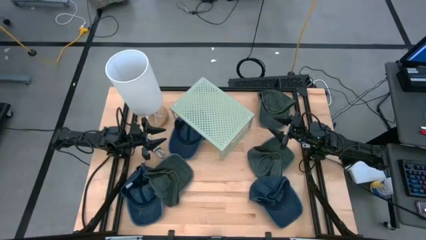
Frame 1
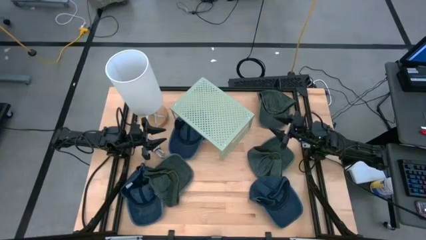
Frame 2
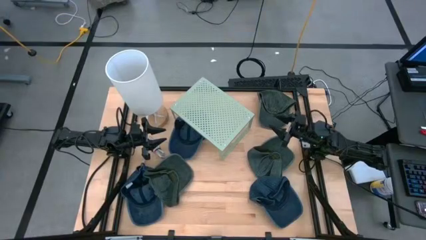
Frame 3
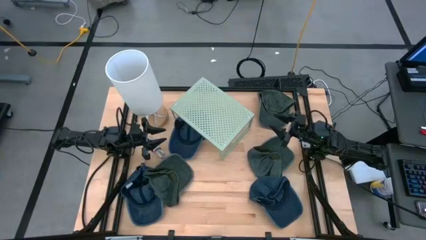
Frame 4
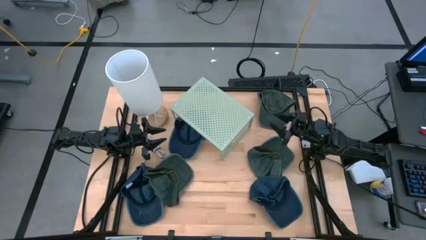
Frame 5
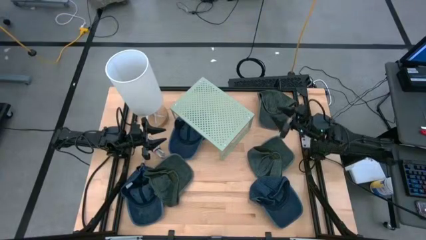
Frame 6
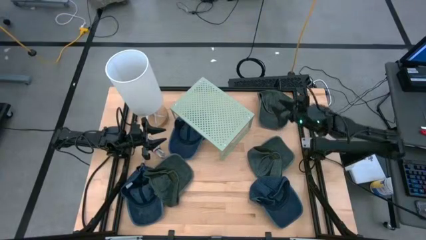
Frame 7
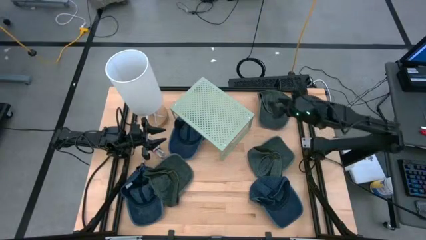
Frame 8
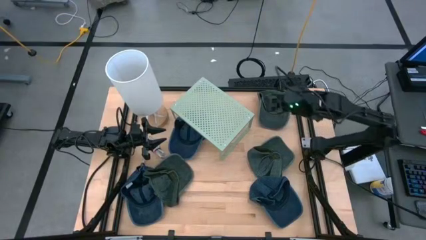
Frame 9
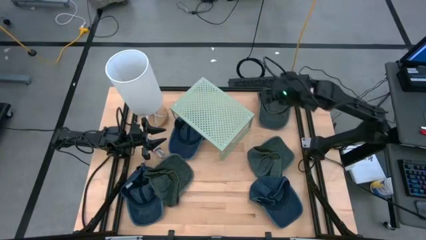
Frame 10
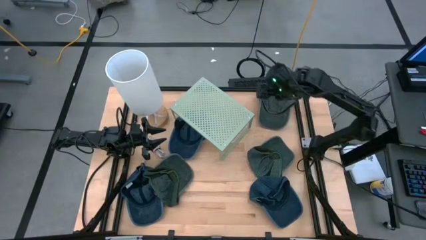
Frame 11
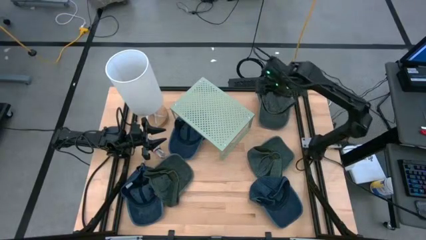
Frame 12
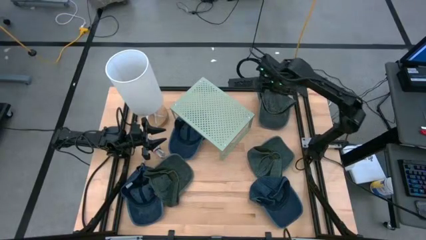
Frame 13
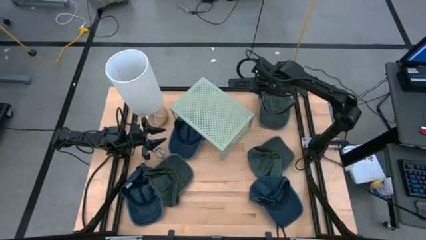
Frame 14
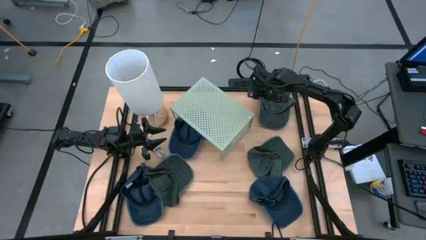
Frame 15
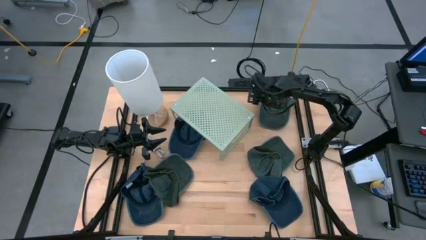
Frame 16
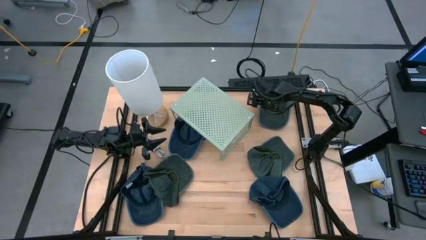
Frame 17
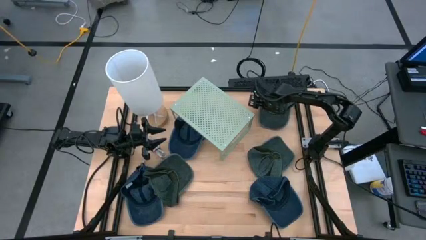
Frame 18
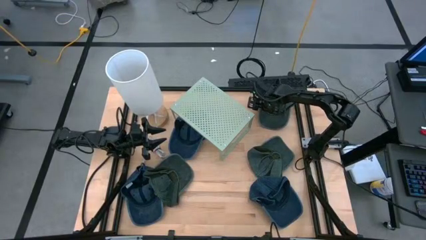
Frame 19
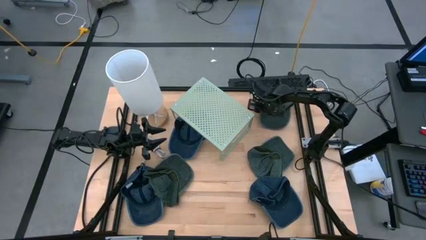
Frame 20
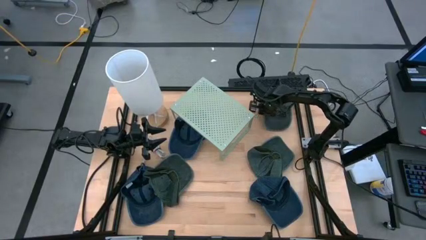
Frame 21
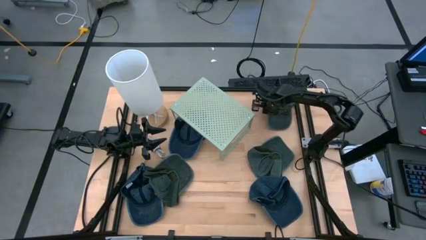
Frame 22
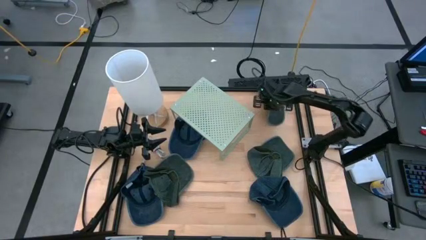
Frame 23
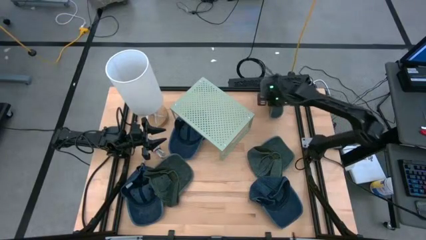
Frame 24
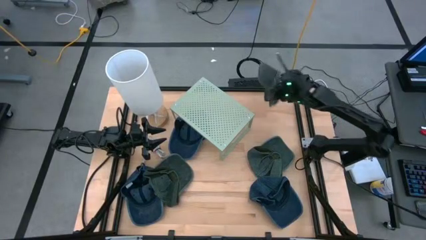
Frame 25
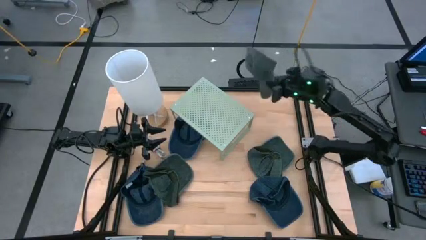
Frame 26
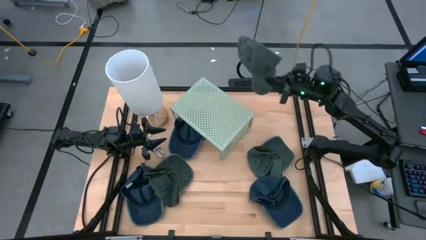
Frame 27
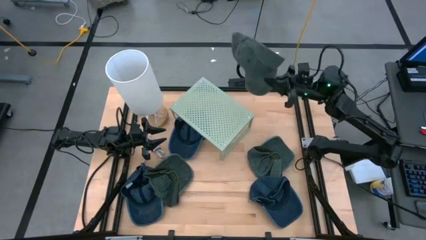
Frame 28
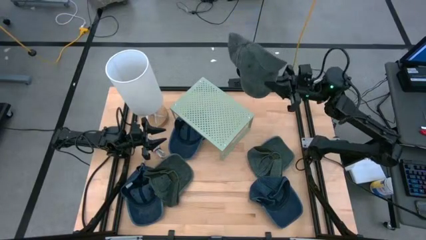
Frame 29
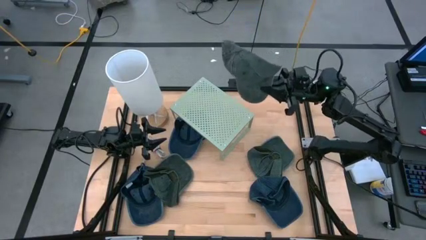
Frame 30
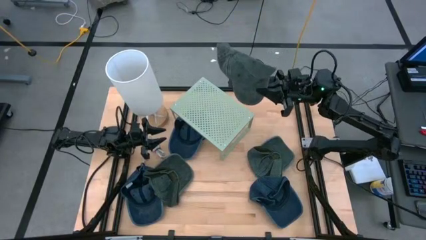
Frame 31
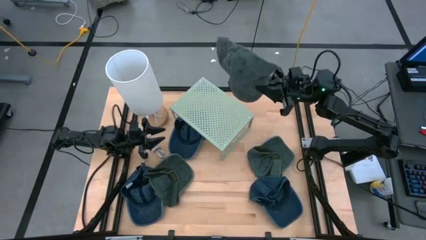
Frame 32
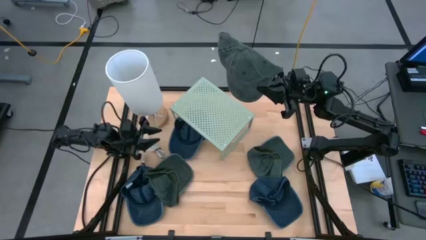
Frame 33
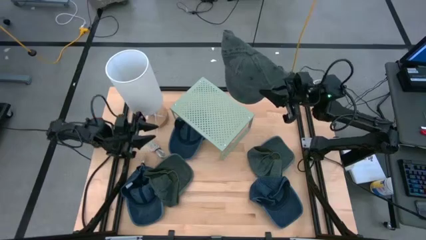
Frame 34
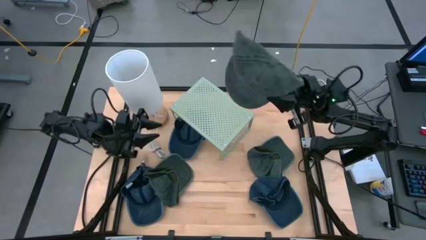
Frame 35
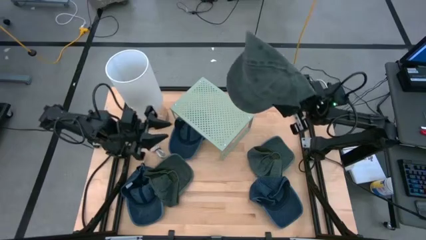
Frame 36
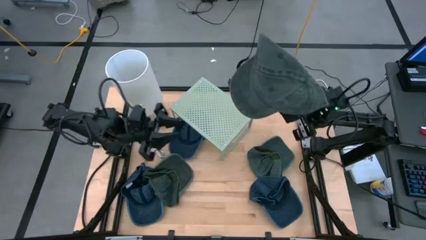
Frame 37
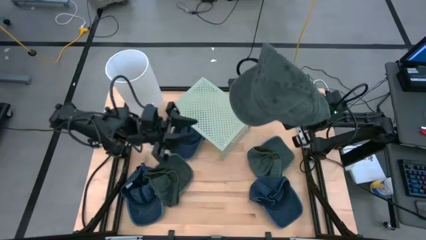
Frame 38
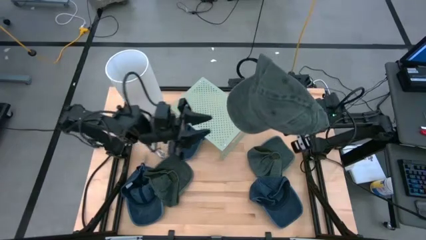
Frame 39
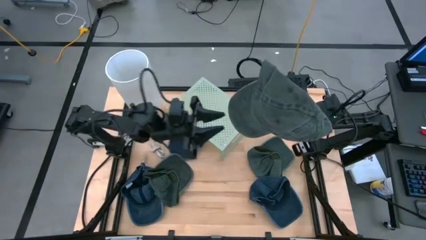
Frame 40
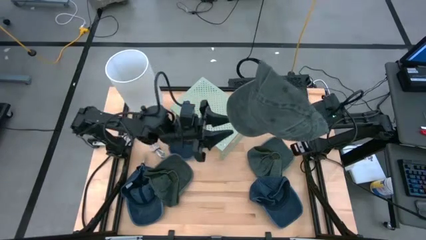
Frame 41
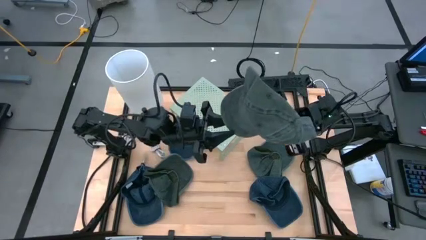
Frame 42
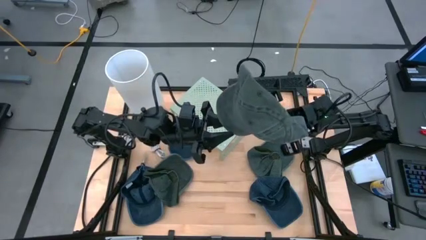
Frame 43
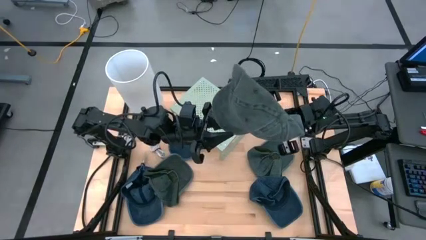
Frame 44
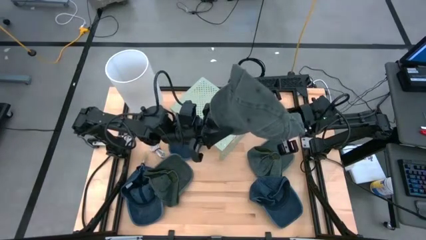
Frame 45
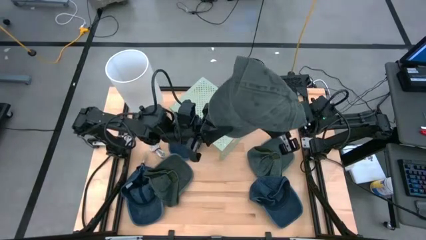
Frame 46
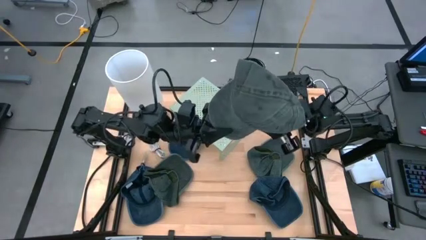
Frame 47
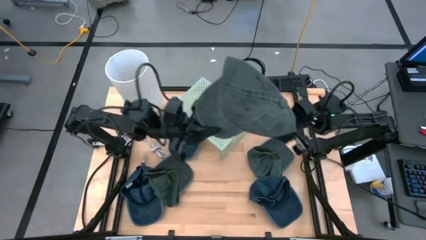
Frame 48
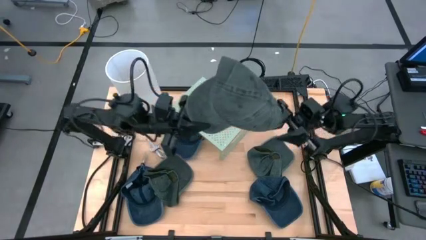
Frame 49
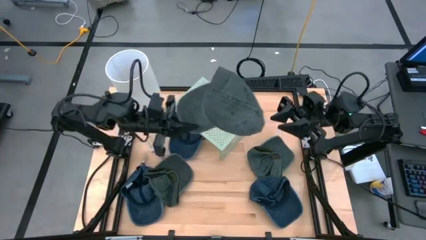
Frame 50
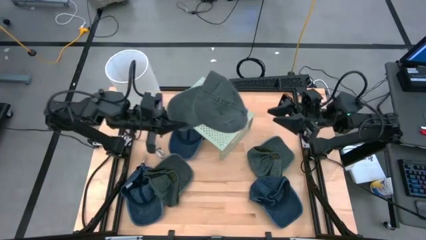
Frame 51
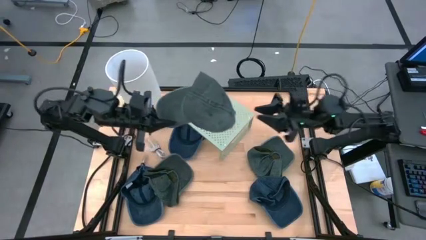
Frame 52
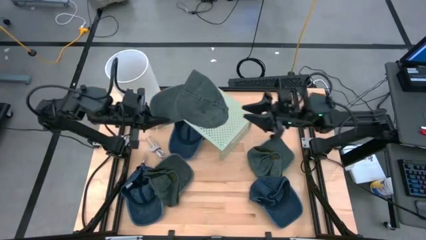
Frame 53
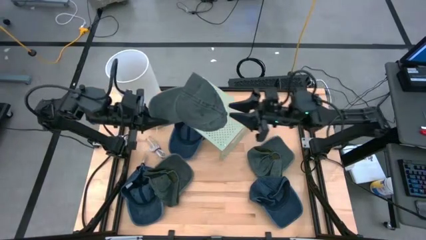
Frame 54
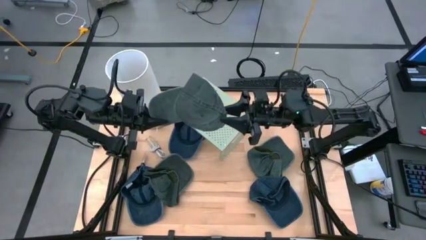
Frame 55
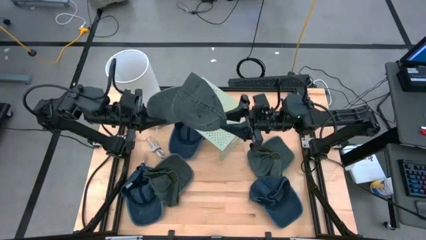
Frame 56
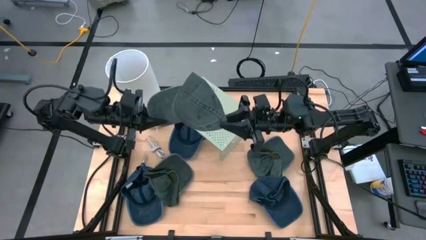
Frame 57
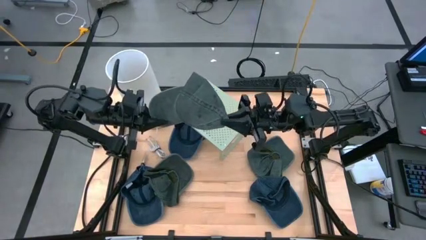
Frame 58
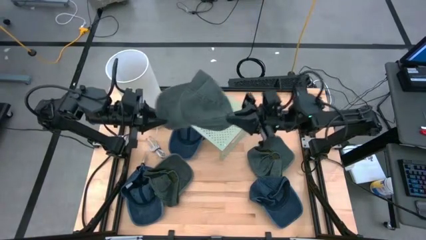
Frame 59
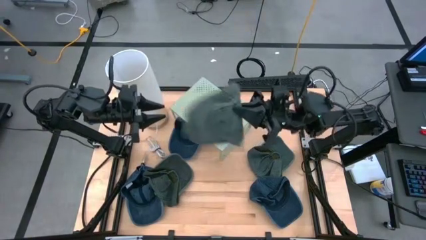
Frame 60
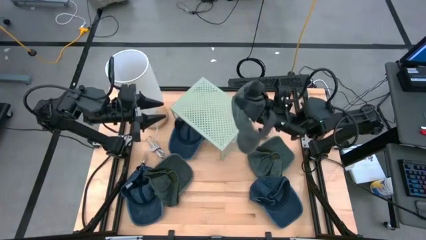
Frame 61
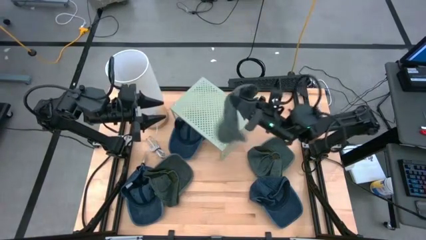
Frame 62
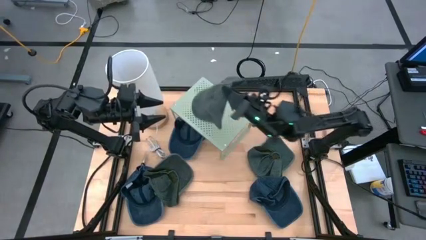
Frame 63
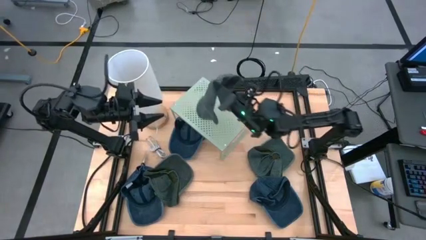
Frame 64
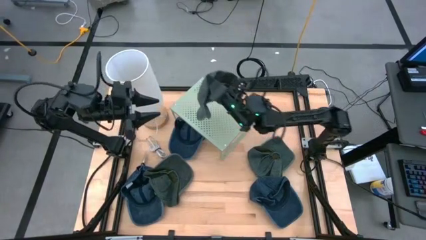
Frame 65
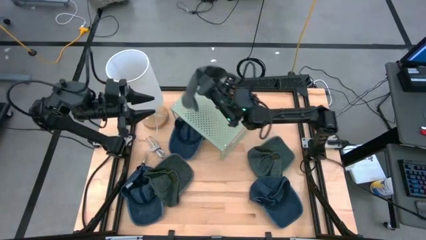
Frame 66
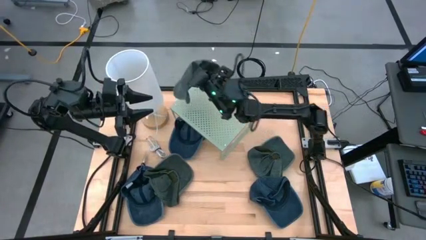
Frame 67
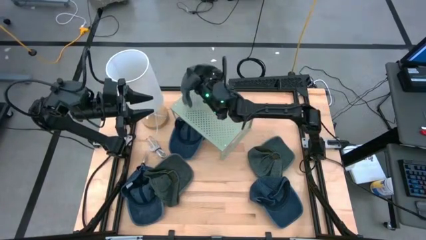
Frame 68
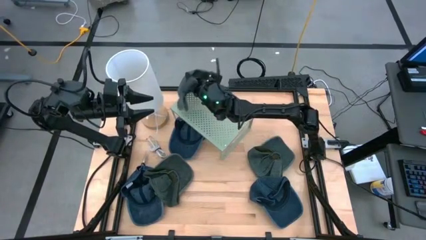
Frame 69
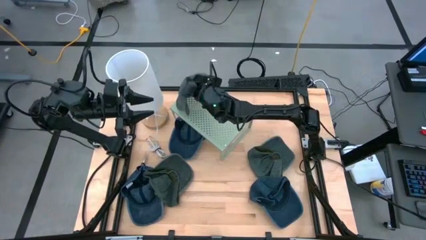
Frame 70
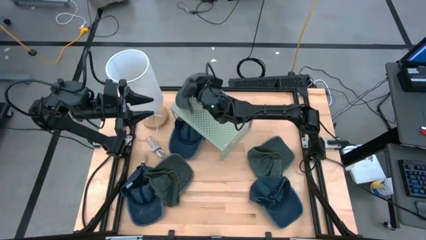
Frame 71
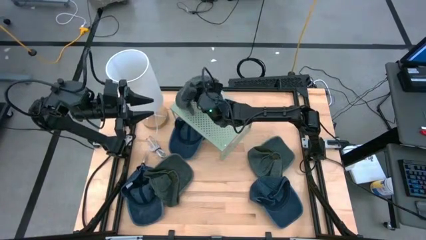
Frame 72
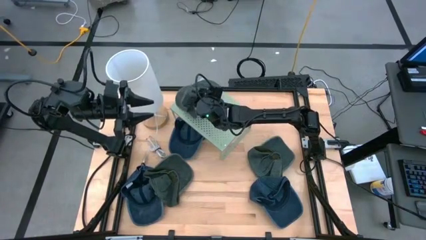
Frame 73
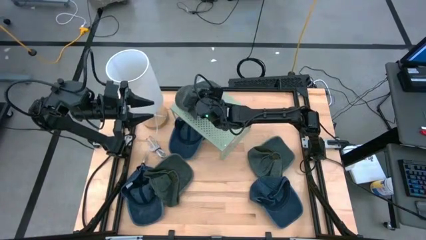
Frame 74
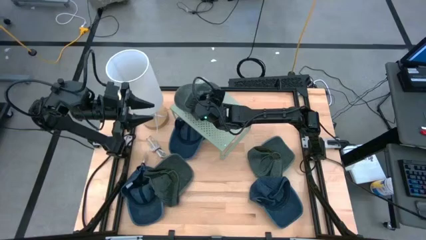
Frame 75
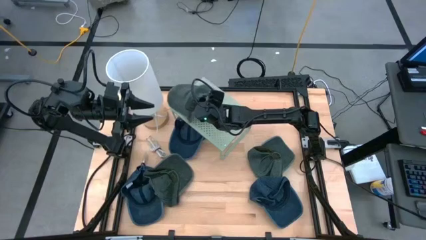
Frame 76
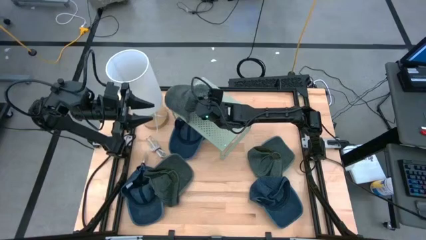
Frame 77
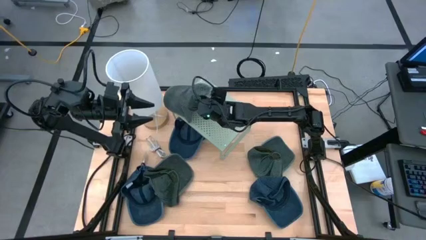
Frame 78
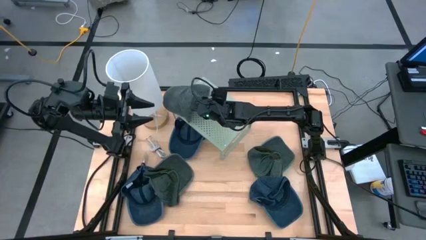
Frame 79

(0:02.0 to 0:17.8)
Task: Pick & Place hat
Put the top black cap on the shelf
